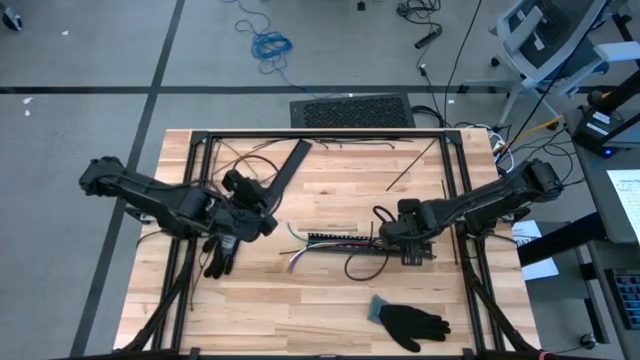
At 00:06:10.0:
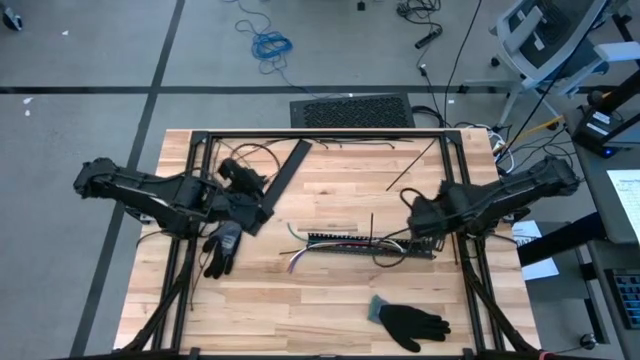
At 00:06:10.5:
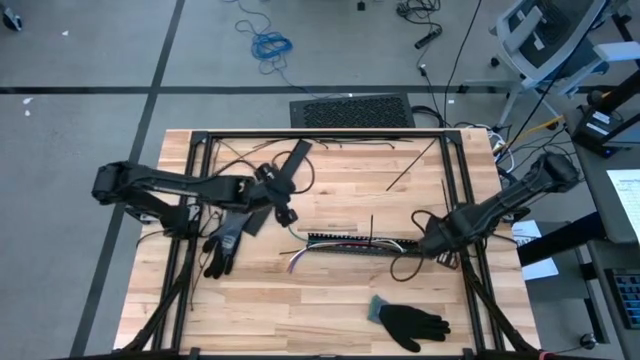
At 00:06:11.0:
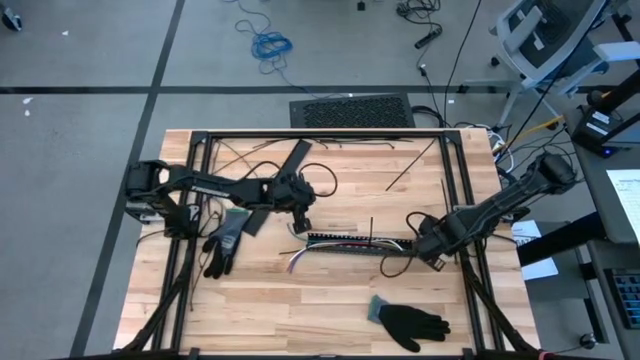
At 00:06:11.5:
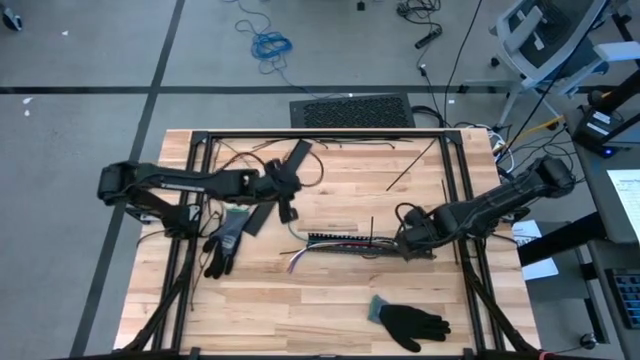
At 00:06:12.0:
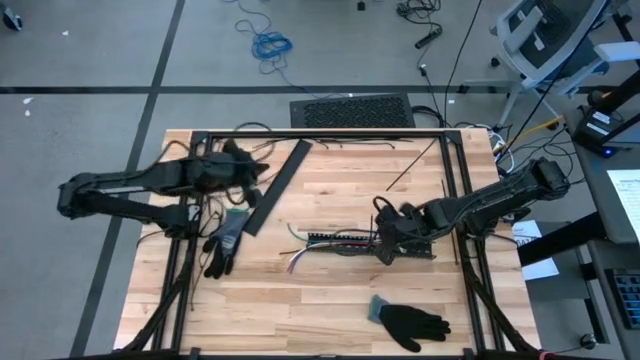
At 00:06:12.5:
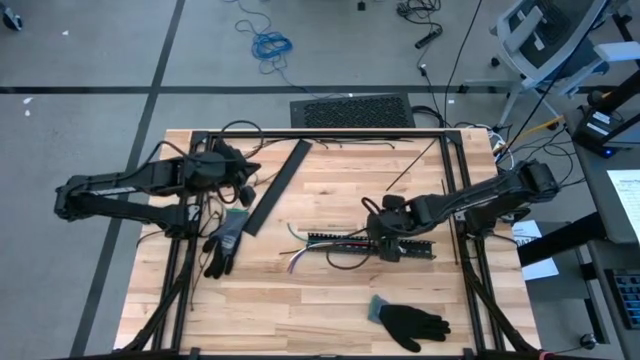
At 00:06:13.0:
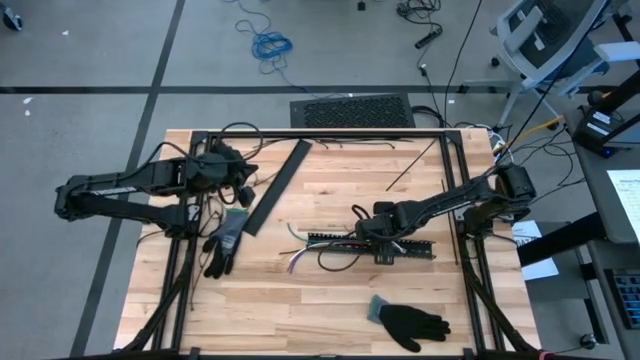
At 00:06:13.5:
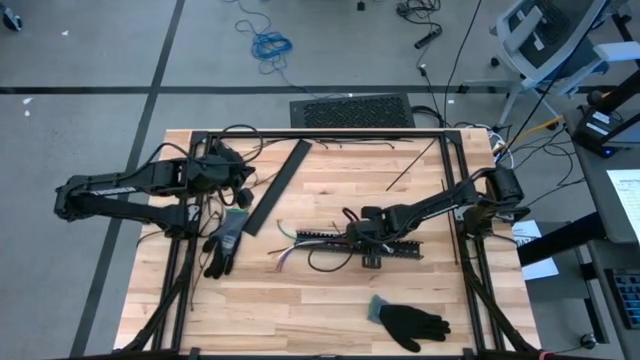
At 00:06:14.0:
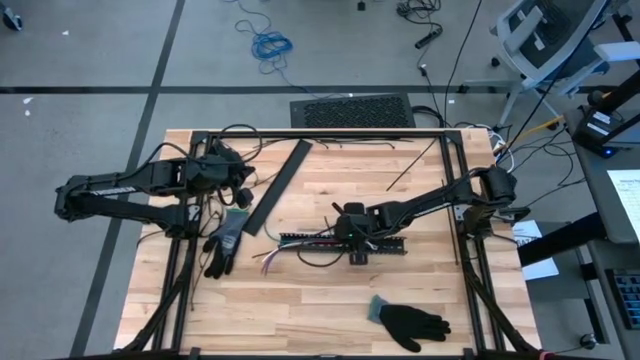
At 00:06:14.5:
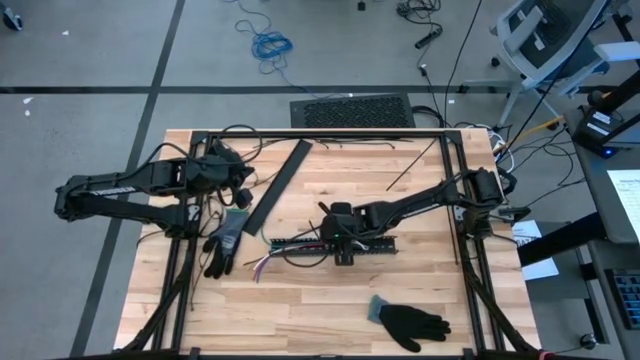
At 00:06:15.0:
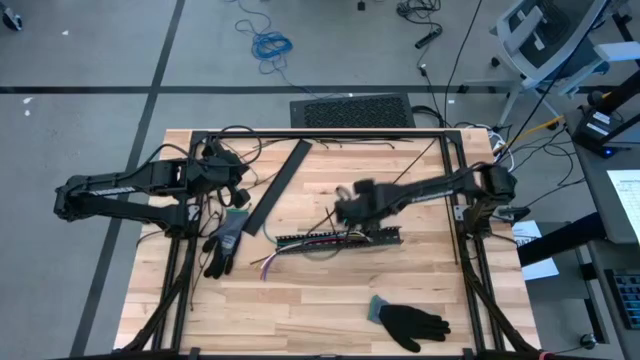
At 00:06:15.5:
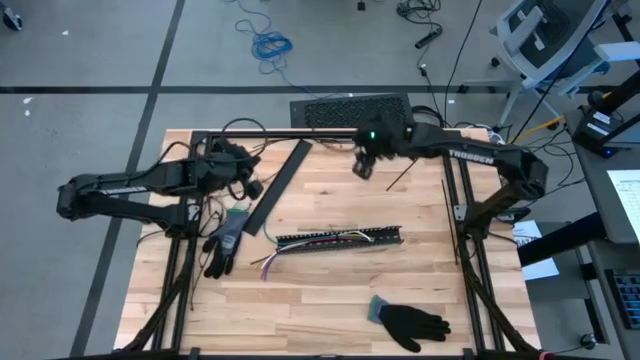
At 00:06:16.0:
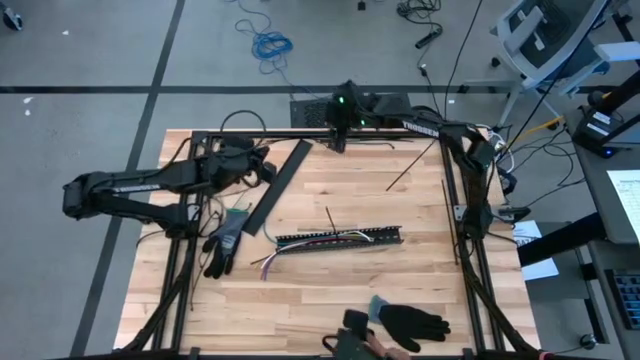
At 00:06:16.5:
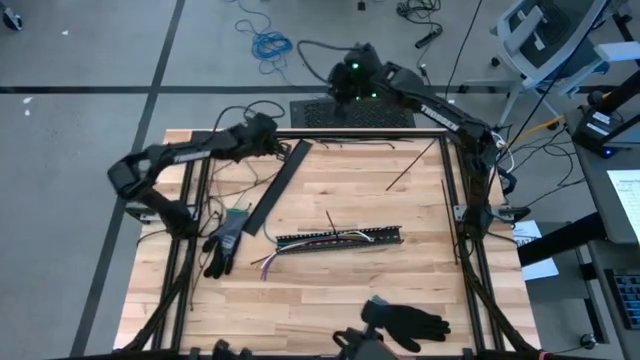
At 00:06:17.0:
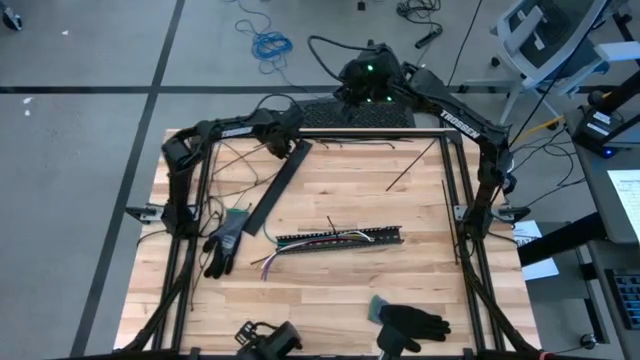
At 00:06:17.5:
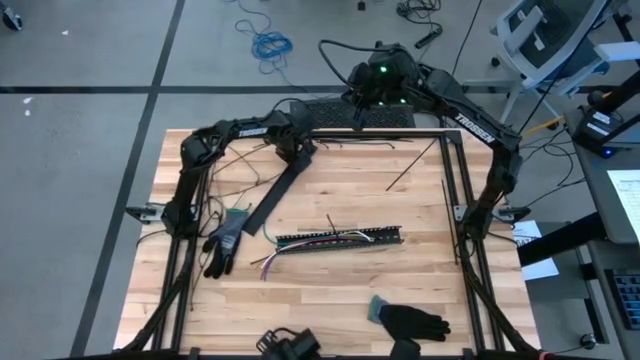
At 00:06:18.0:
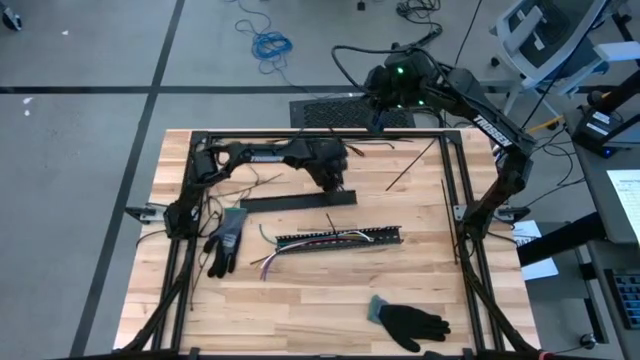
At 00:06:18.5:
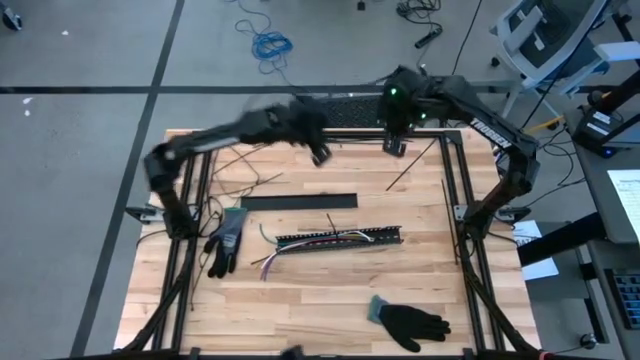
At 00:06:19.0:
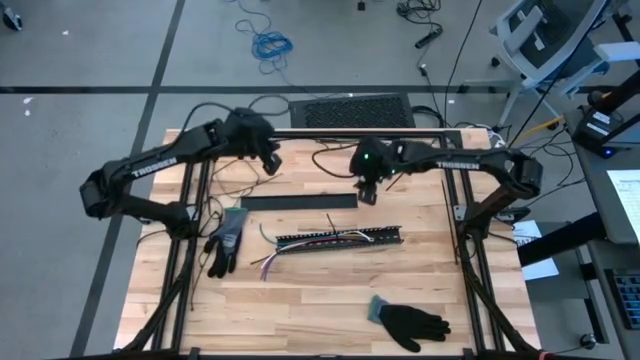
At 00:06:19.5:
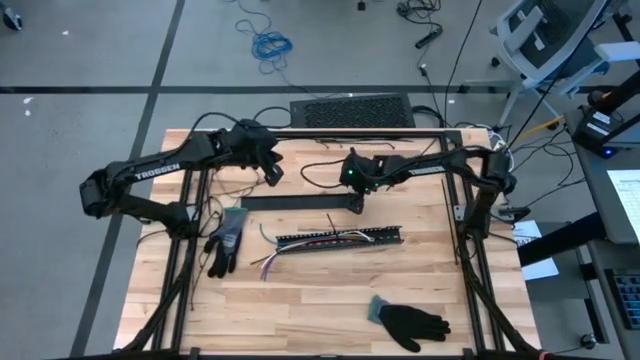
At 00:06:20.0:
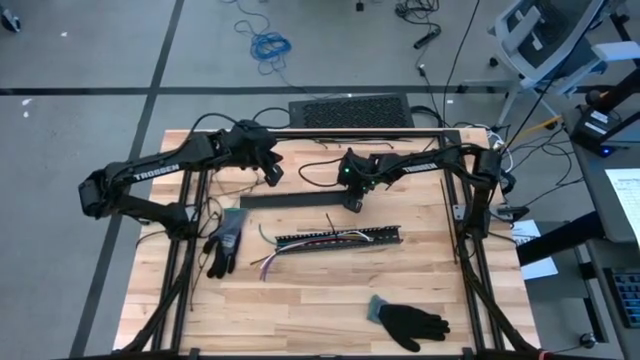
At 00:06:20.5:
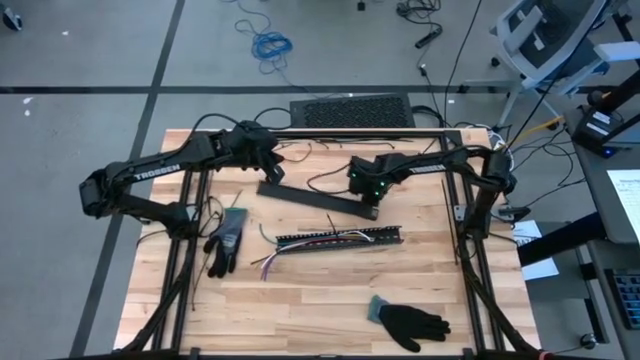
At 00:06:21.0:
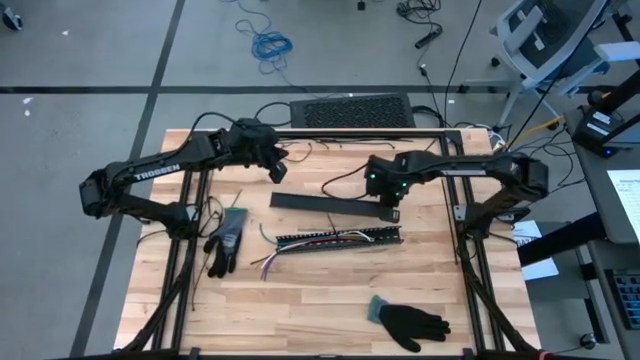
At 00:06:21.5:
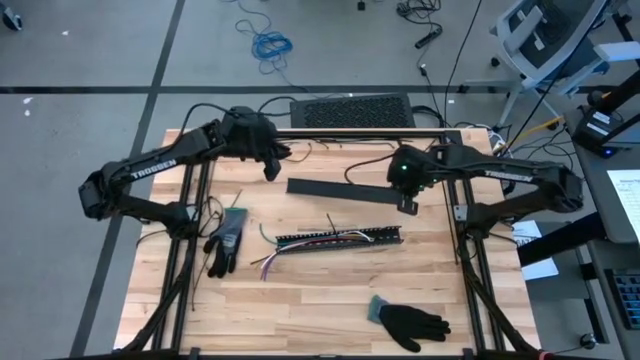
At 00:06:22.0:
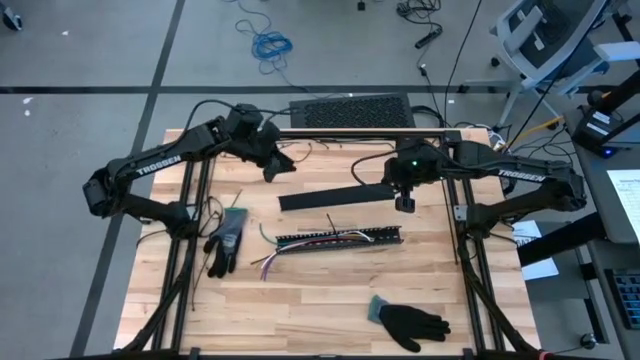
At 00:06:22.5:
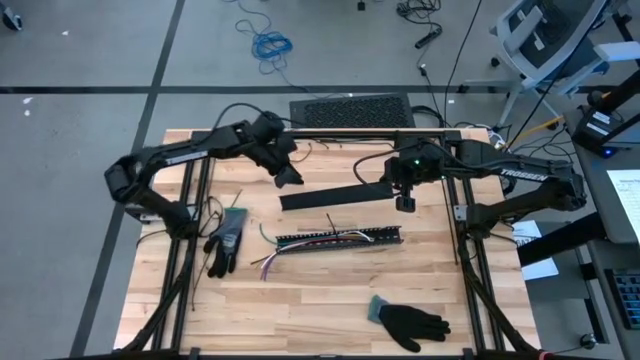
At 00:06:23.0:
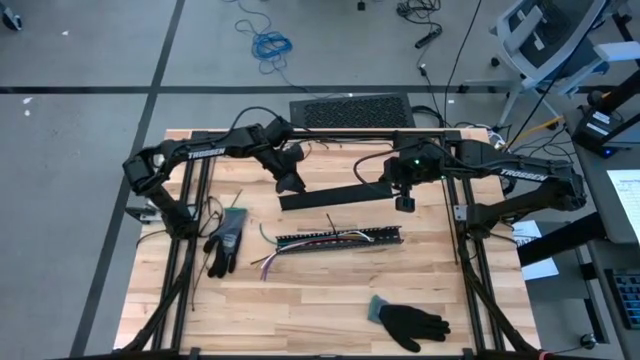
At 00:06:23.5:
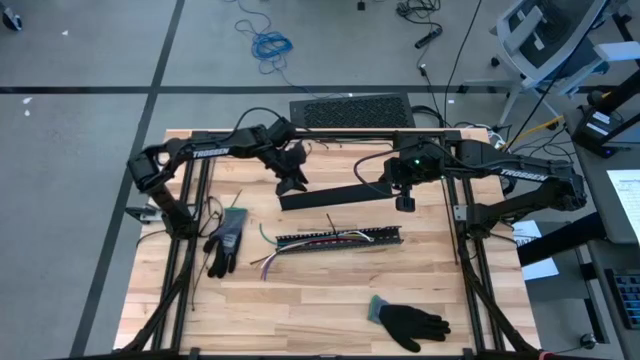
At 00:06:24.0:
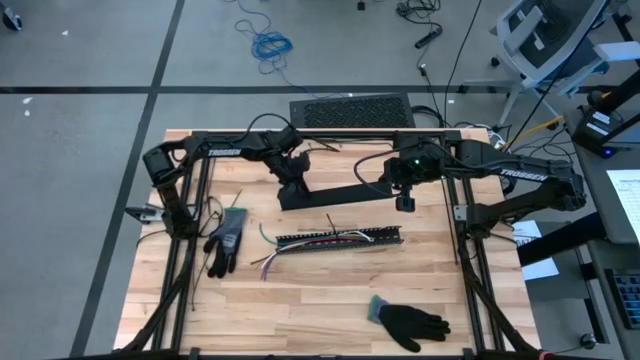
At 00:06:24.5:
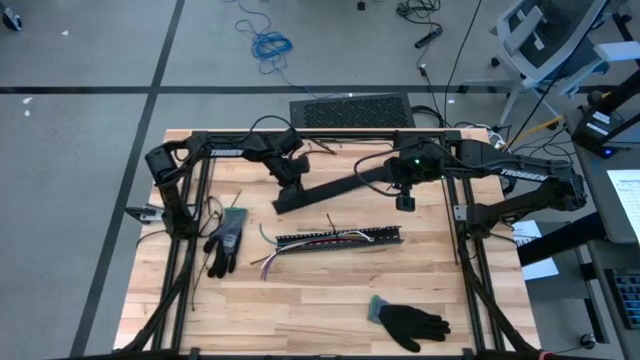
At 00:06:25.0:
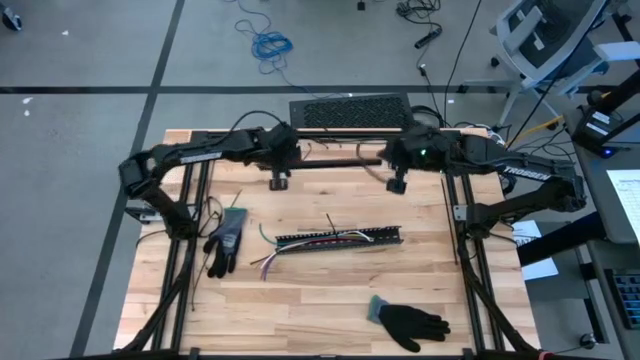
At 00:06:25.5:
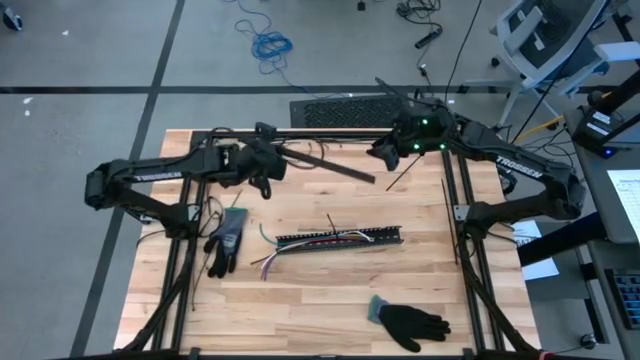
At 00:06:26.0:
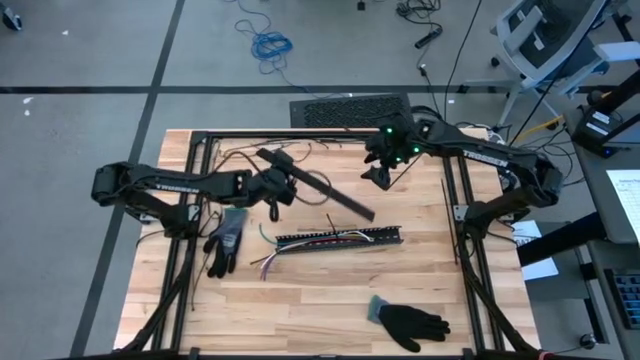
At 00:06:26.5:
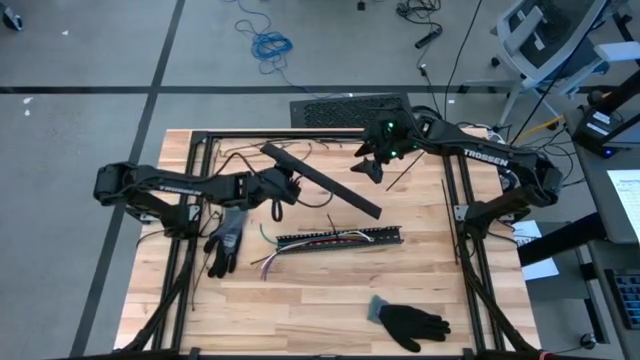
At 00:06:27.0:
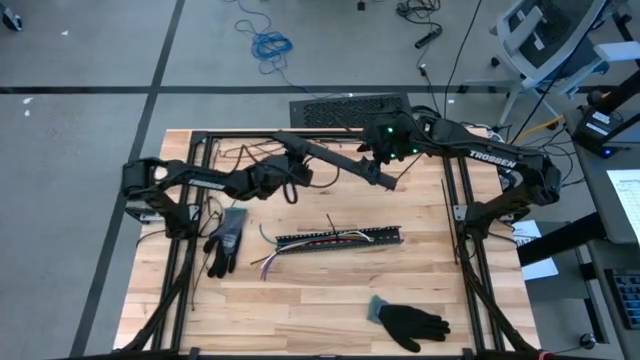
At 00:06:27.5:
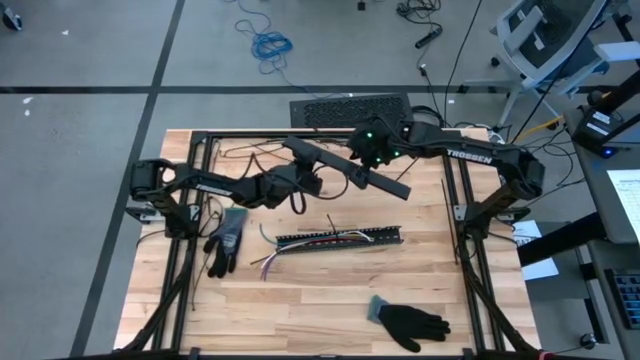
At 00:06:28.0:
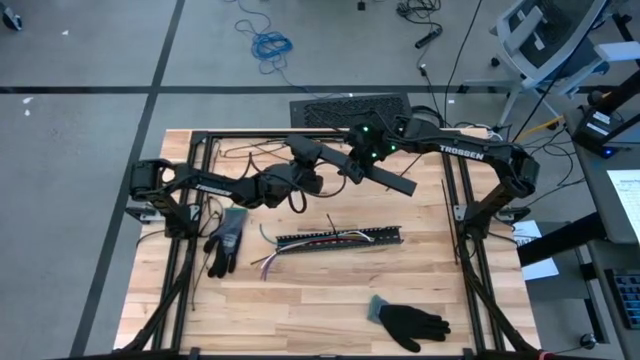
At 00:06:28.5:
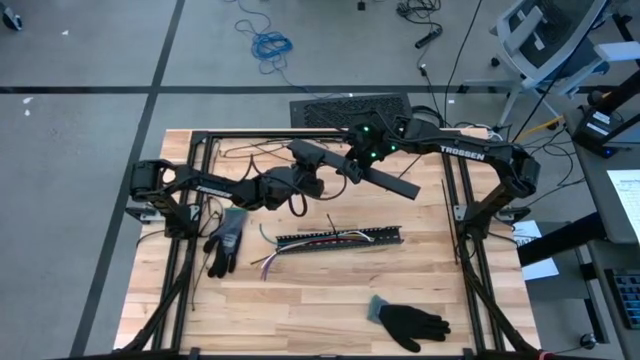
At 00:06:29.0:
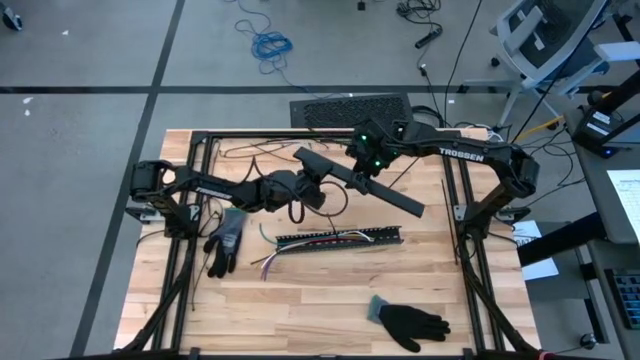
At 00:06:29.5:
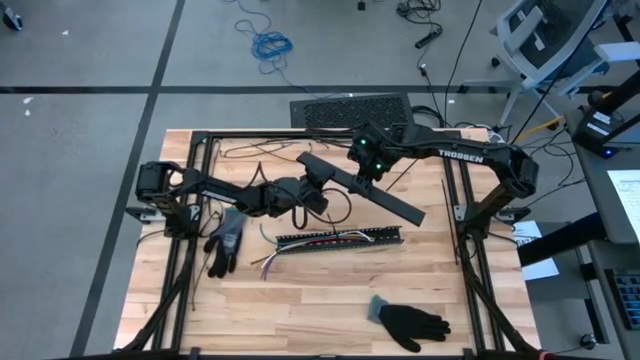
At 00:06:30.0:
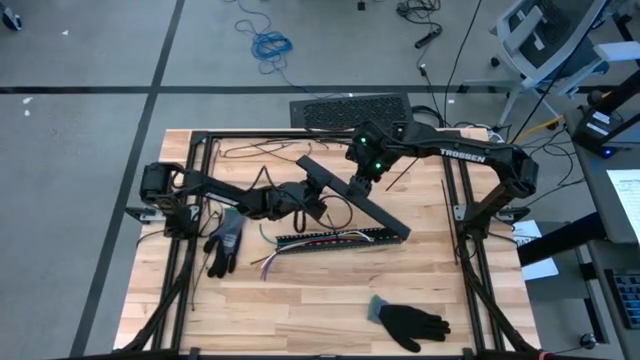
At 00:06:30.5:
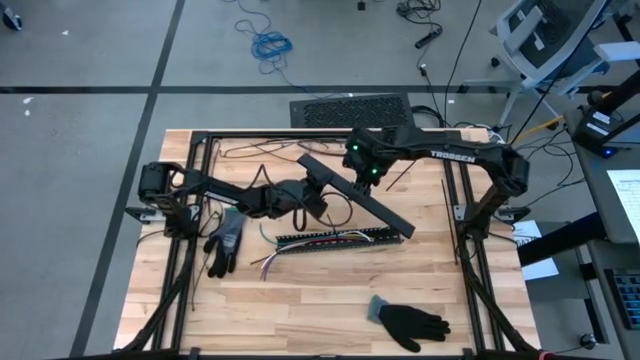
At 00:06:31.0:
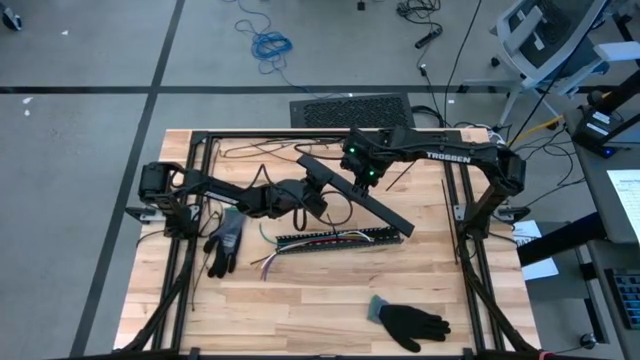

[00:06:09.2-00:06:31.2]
Task: Ziptie cables
Close the cable duct with the cable duct cover
